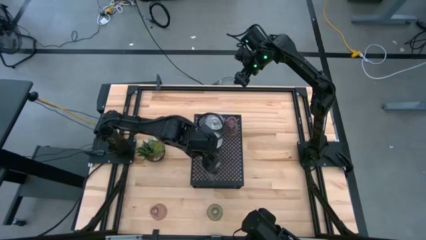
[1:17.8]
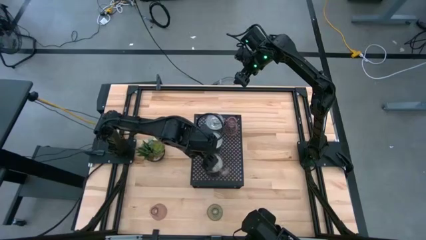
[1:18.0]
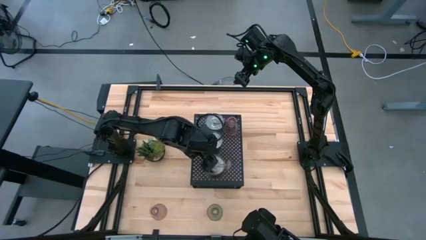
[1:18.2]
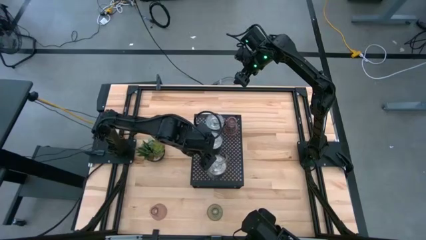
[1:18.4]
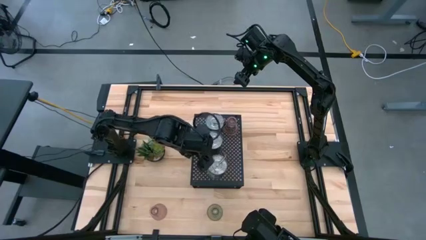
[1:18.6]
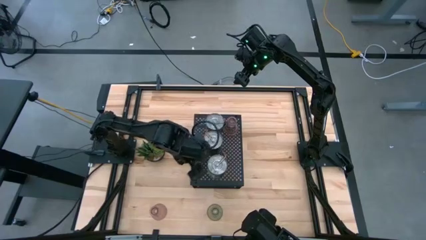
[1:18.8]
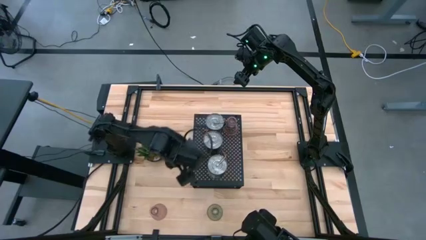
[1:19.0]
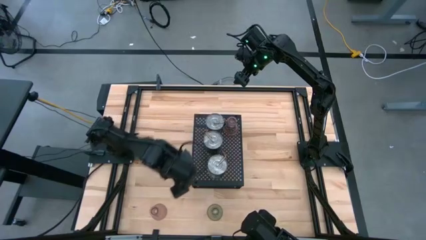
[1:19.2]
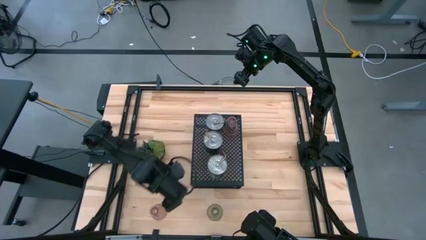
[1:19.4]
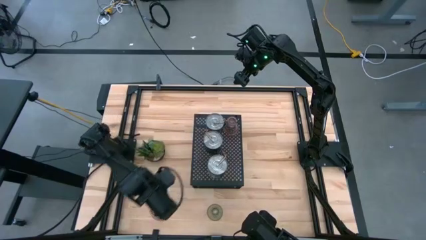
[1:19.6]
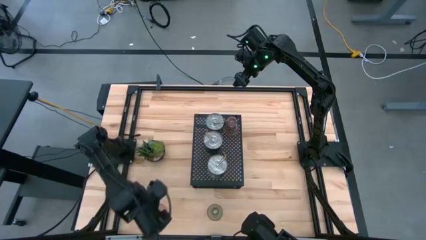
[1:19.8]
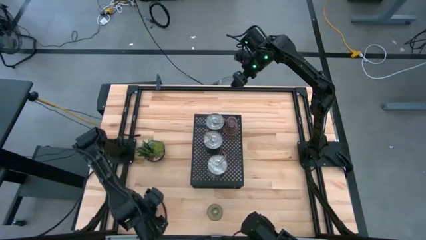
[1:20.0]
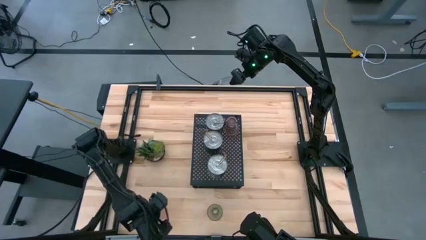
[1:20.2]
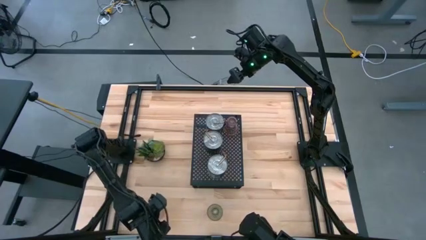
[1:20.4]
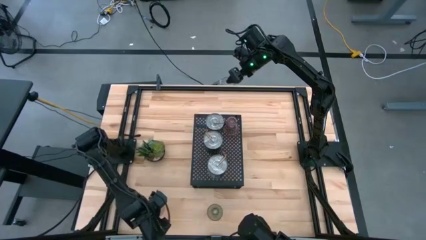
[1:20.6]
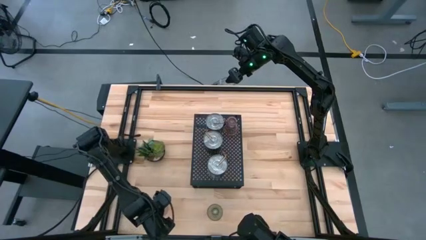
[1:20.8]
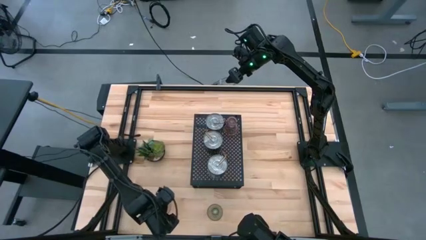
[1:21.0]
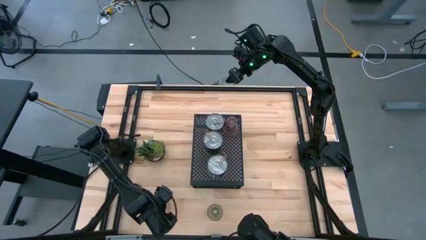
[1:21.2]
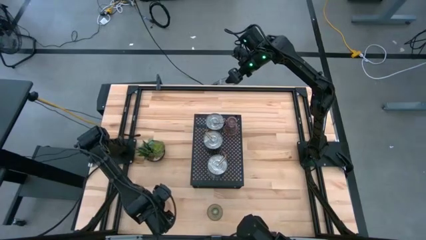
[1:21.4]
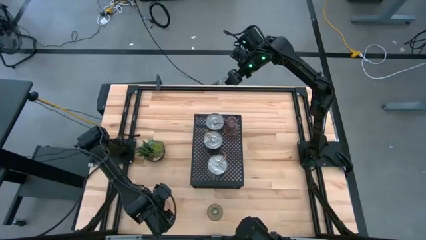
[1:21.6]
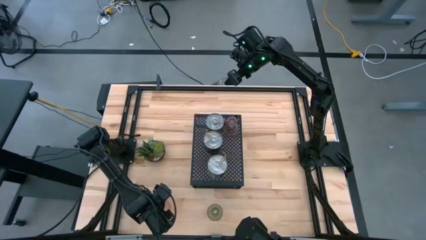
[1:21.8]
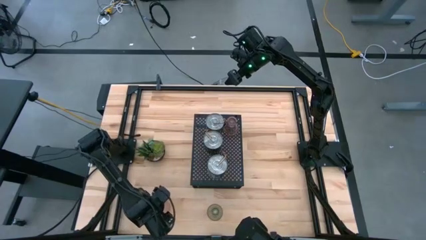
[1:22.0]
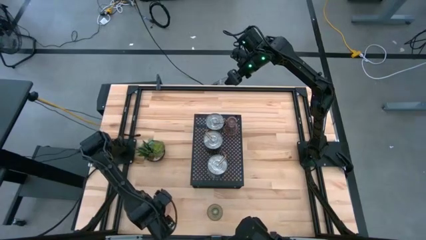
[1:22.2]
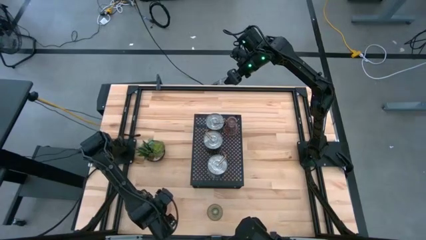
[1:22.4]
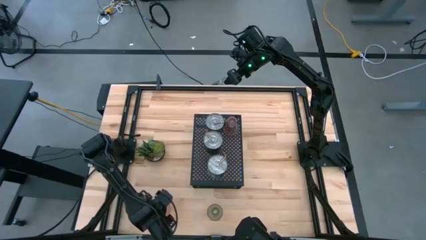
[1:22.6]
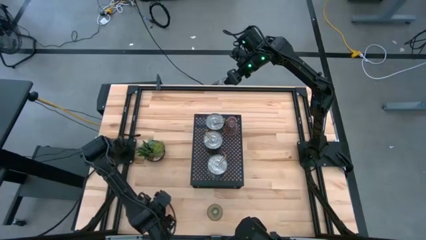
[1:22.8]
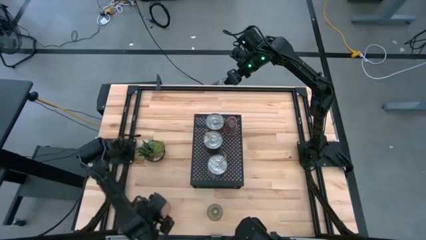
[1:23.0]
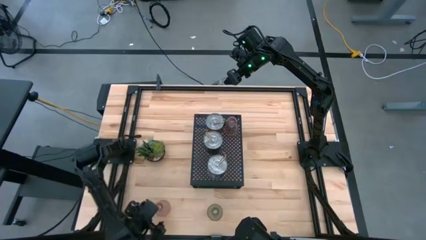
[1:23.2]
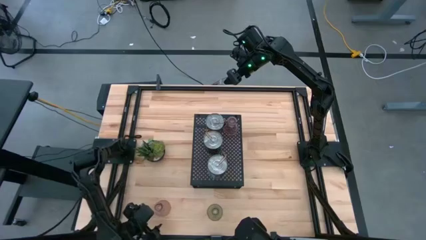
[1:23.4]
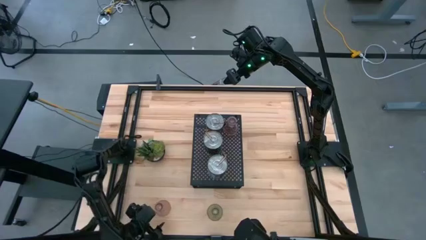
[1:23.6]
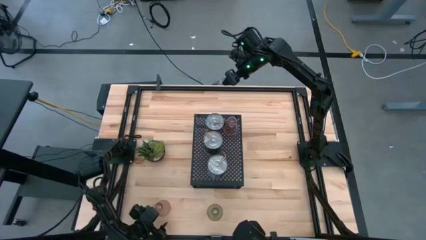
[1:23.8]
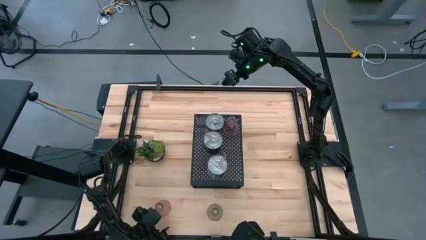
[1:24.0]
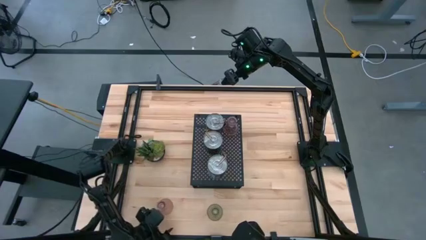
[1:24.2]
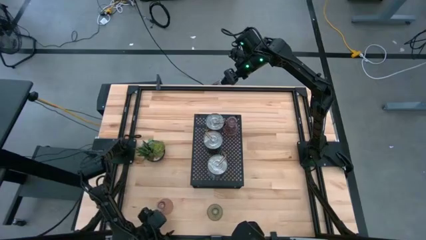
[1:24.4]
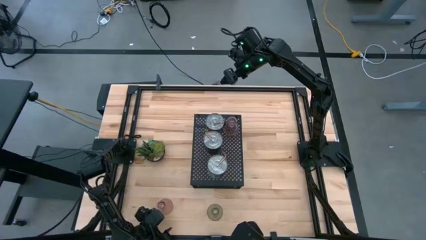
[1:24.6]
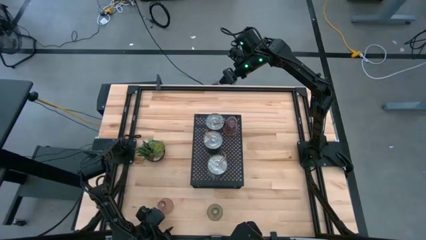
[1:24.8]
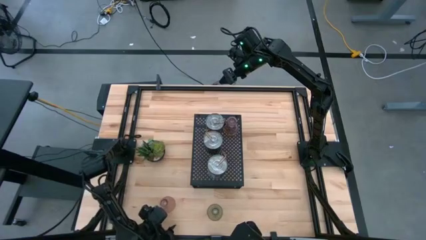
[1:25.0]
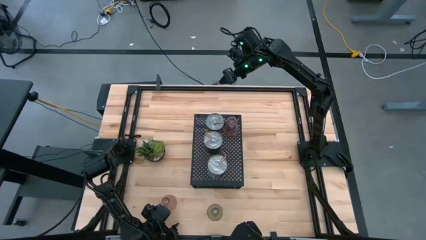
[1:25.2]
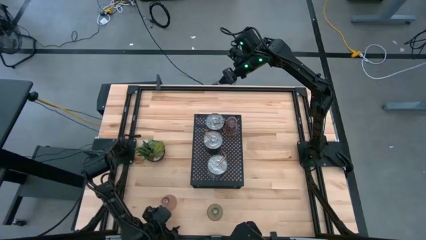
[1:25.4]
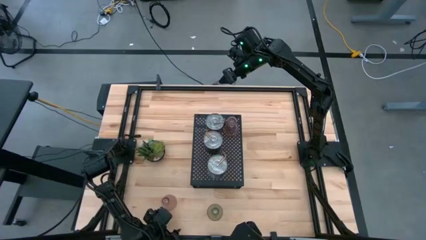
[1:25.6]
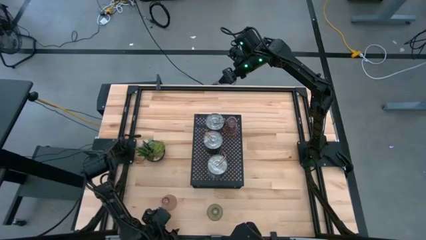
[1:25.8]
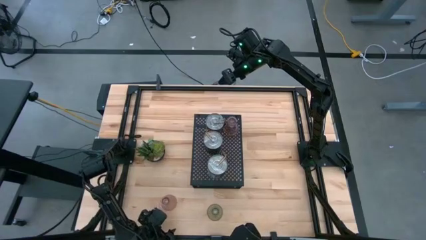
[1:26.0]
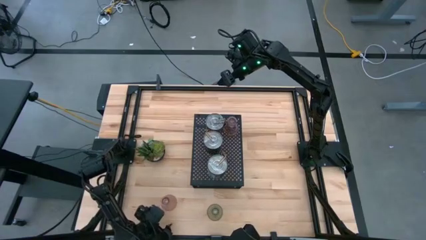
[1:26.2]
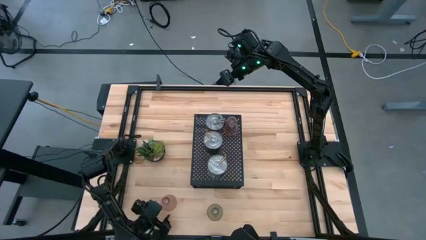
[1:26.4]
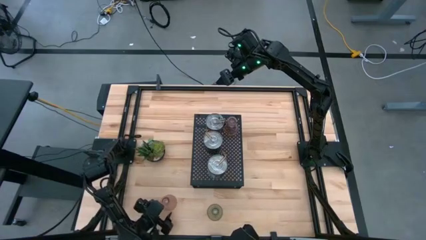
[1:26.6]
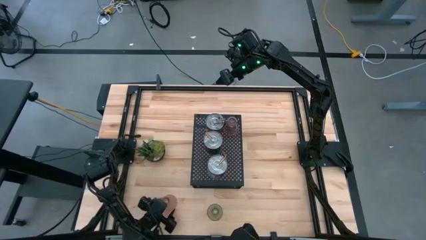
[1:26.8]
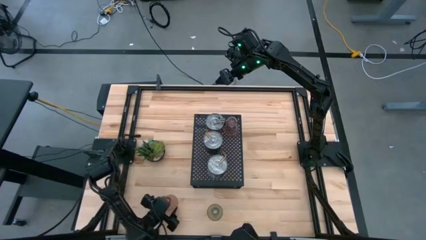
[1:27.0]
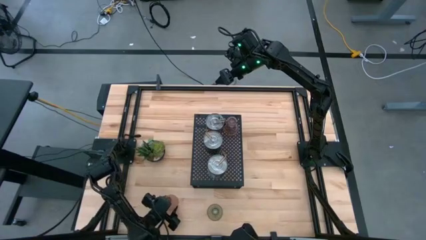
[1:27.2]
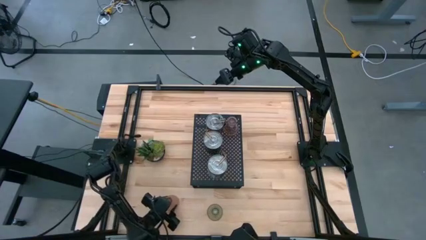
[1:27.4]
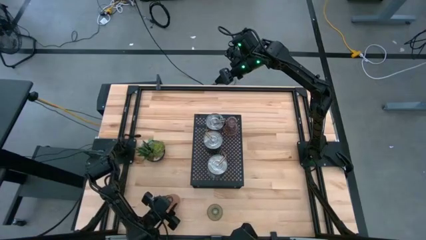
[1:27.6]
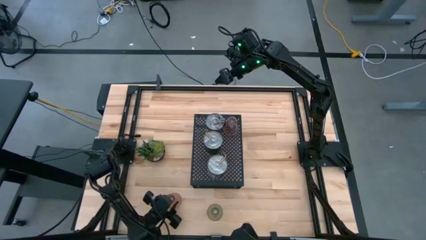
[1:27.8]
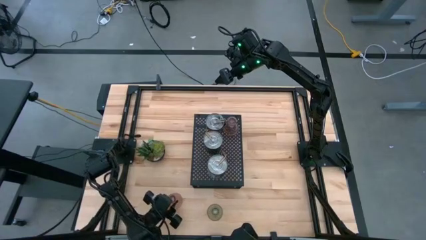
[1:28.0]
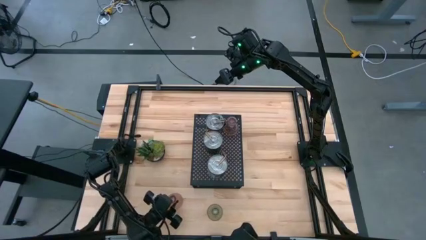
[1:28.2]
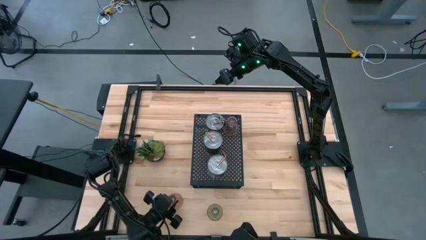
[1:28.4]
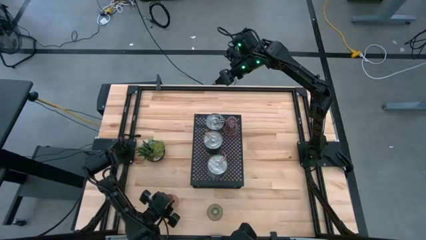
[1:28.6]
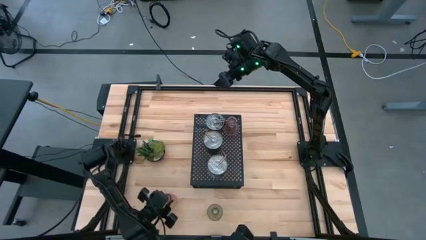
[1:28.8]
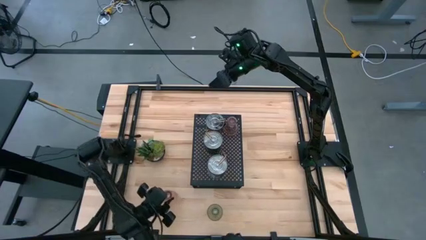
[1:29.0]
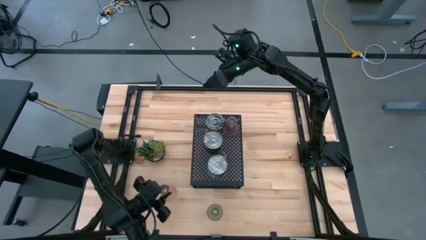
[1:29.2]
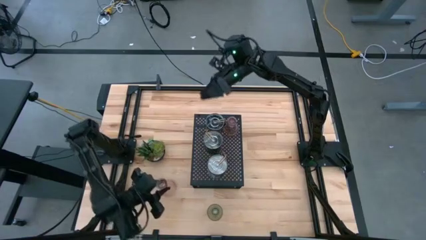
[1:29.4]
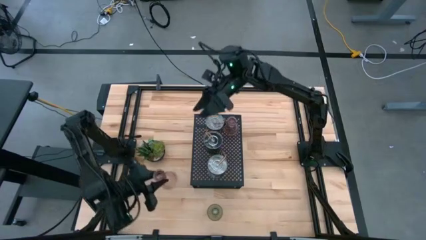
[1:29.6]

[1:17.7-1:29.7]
Task: Pick & Place candle stick holders
Put the pink glass candle holder on the shelf aligned with the pink glass candle holder

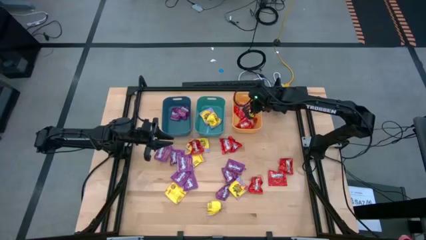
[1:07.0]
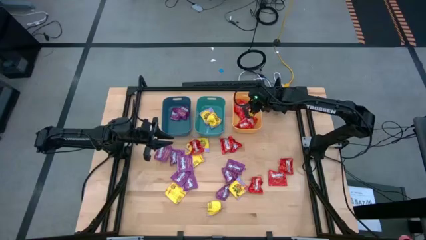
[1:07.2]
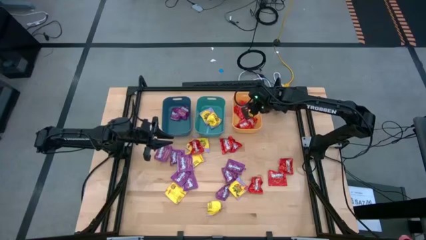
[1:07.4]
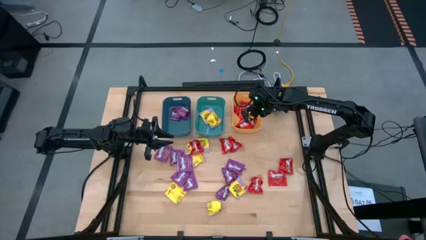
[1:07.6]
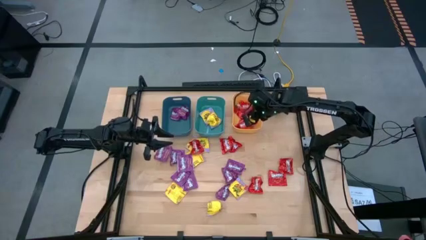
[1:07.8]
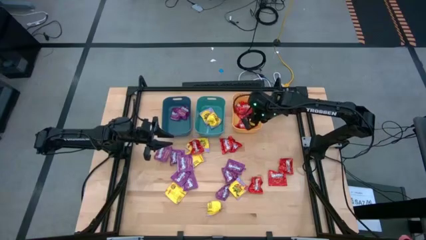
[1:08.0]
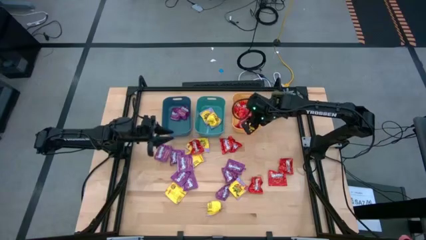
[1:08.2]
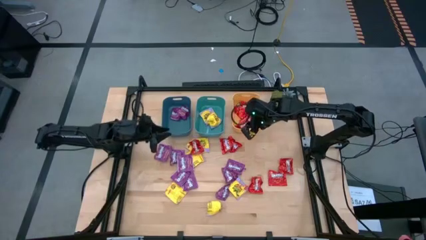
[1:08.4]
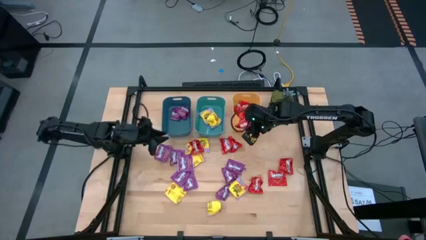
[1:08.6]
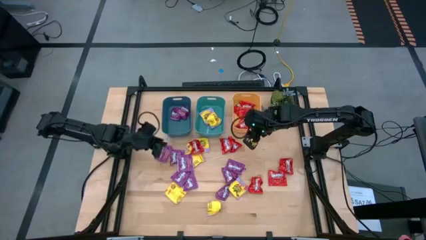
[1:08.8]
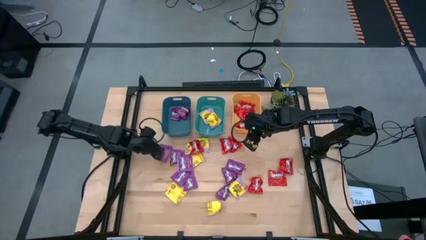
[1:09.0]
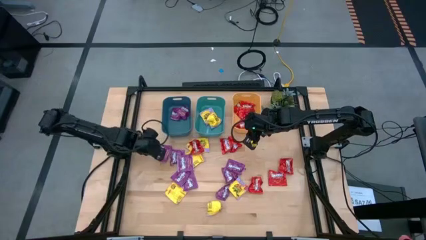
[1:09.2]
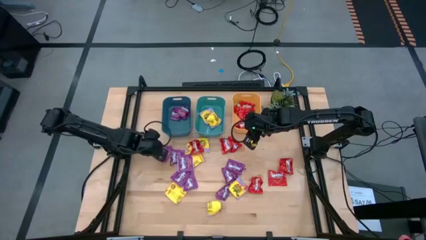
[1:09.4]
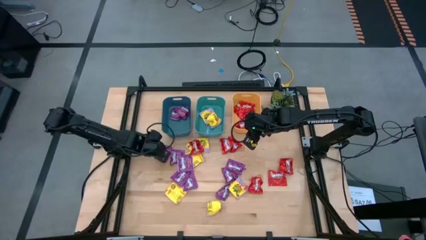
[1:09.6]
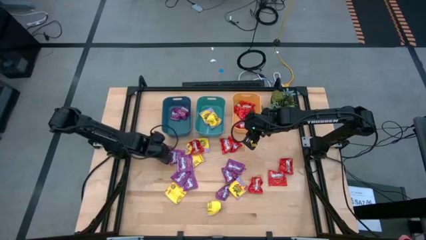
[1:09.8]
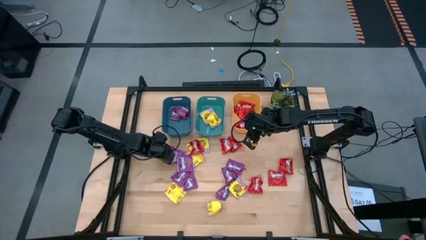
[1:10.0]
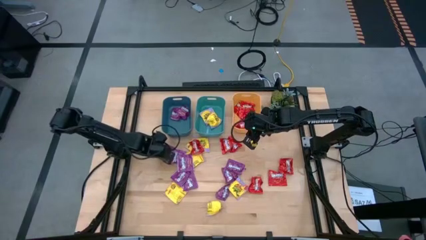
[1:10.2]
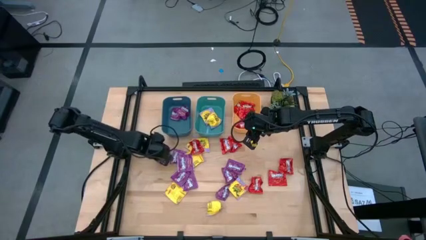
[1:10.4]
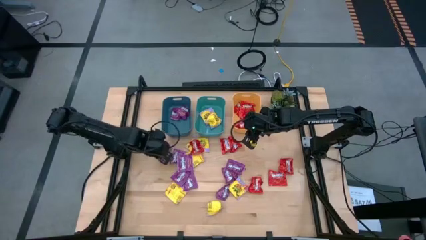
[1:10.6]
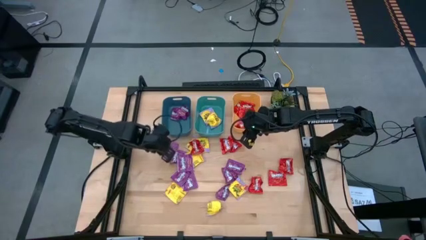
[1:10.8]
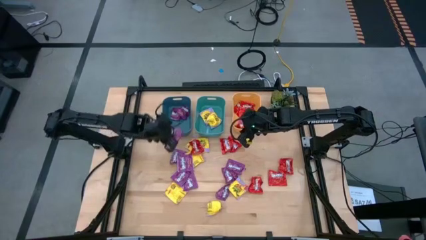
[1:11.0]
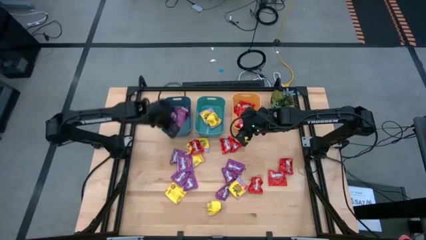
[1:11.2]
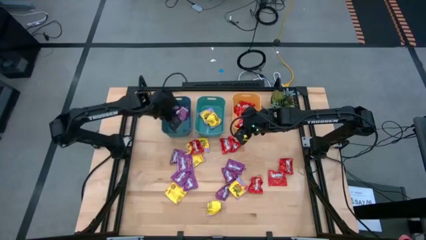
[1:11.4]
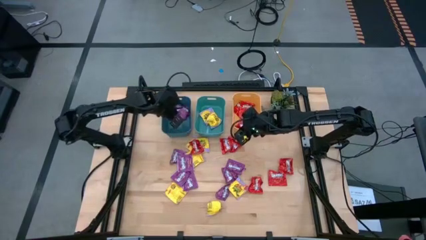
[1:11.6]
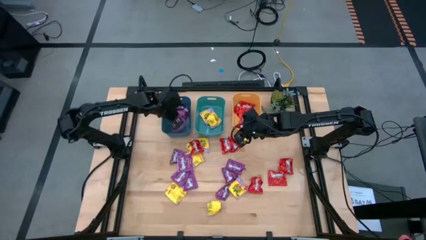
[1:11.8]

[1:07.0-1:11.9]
Task: Sort candy
Put the violet candy into the blue bin
